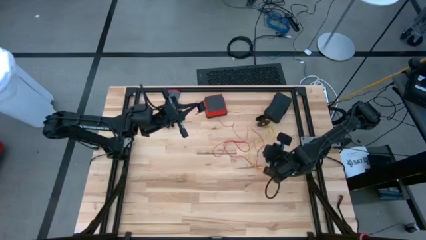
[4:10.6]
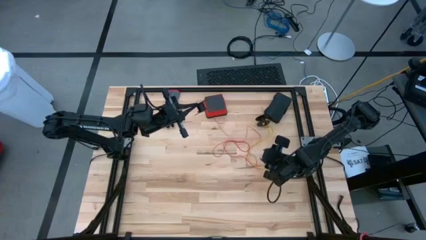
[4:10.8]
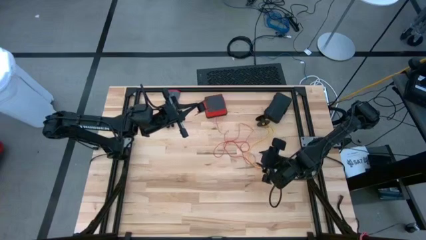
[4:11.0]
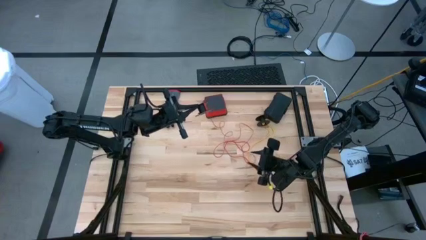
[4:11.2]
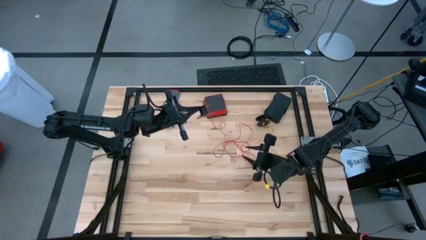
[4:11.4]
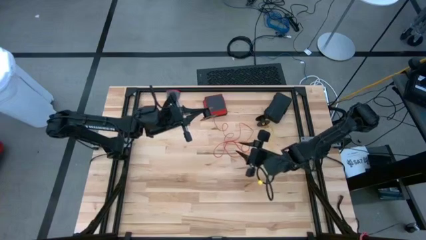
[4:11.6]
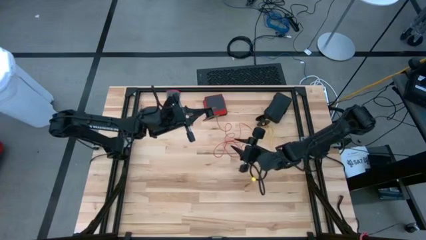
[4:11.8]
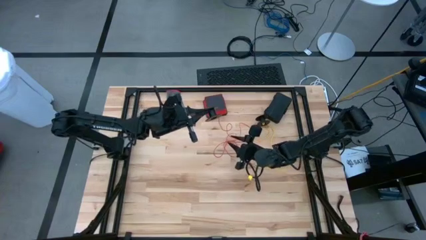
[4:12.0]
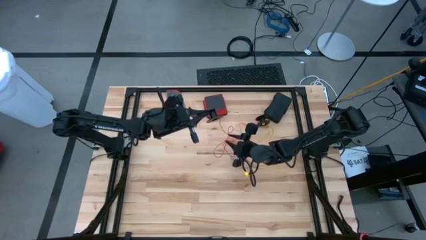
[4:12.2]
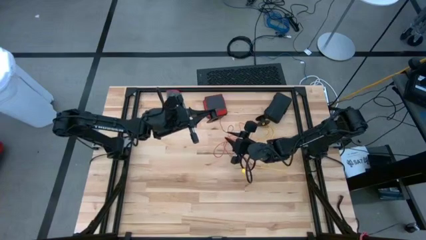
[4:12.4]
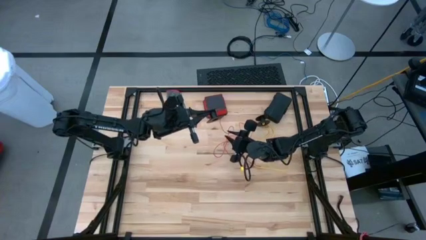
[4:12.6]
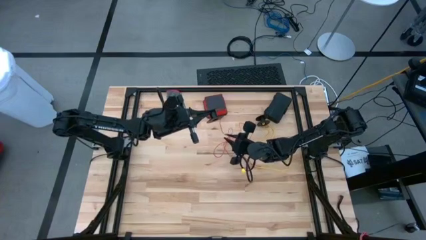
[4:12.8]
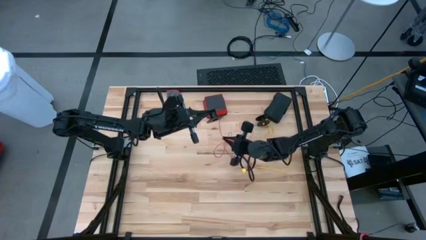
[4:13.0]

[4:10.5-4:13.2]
Task: Coil cords
Coil the red wire onto the spool

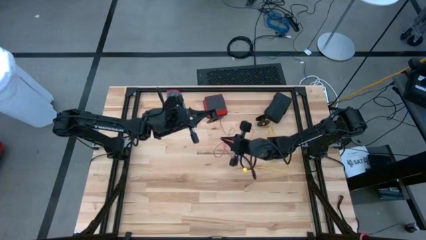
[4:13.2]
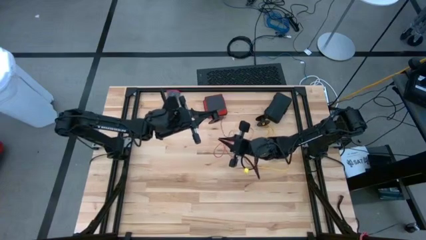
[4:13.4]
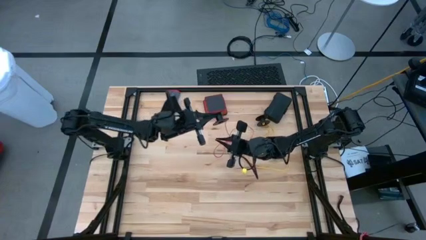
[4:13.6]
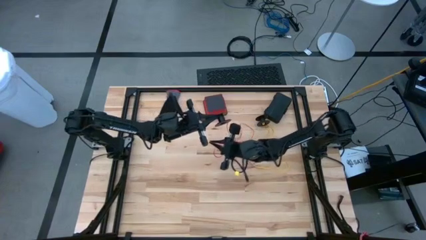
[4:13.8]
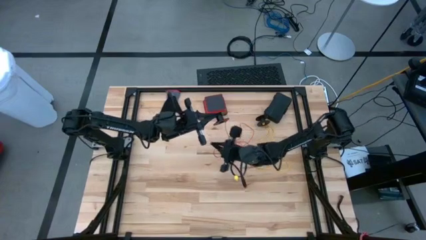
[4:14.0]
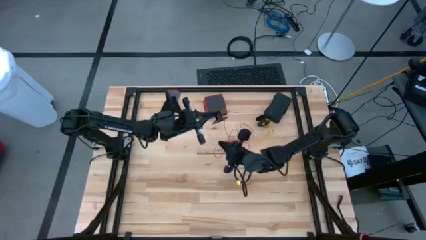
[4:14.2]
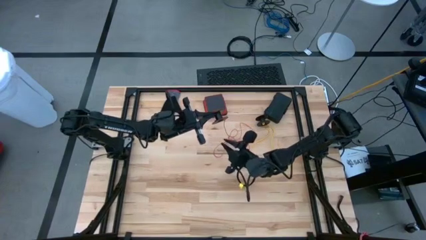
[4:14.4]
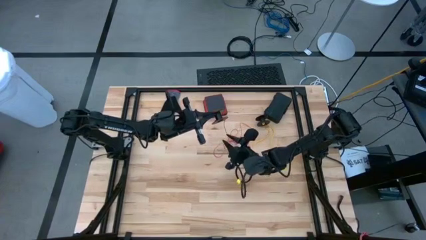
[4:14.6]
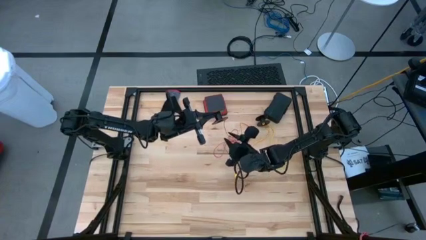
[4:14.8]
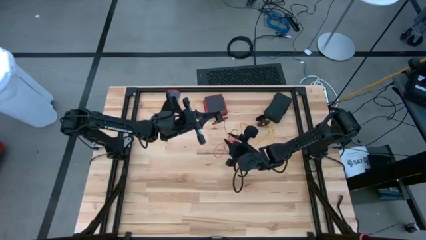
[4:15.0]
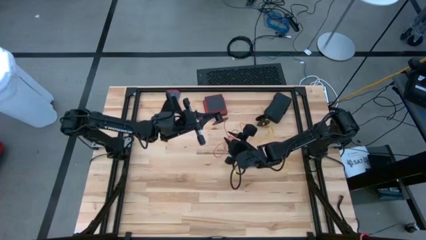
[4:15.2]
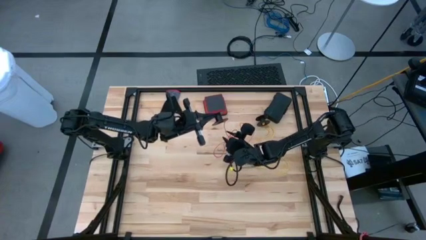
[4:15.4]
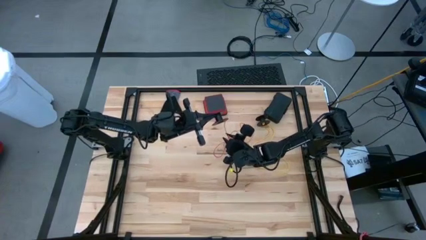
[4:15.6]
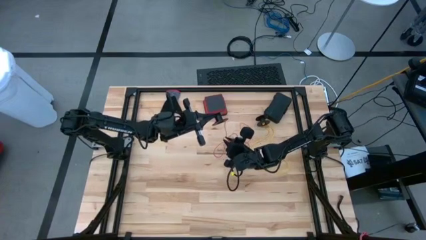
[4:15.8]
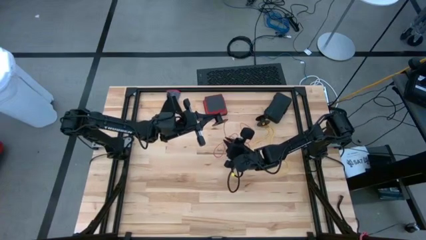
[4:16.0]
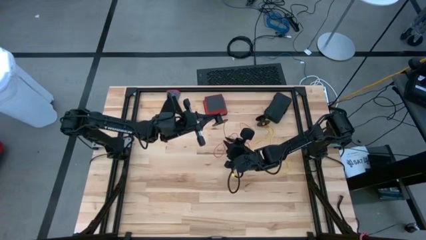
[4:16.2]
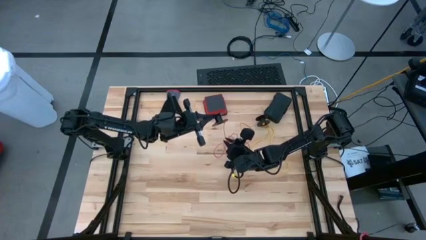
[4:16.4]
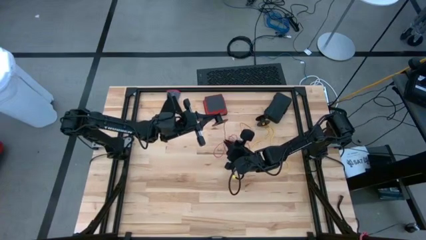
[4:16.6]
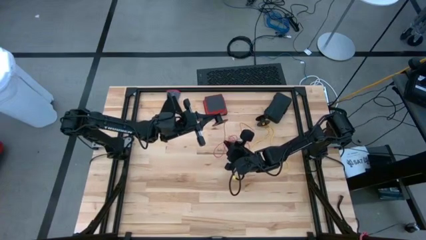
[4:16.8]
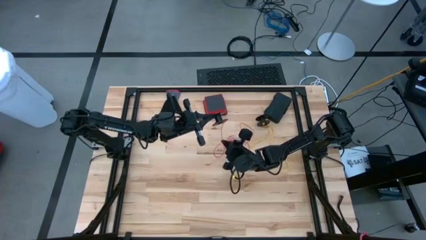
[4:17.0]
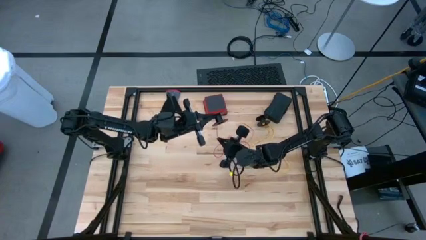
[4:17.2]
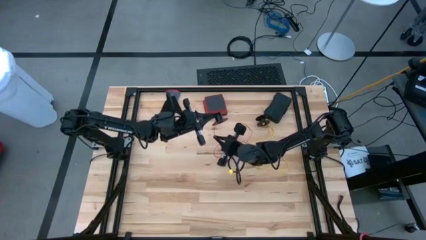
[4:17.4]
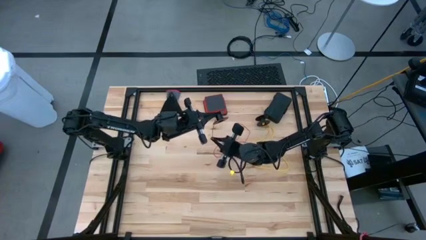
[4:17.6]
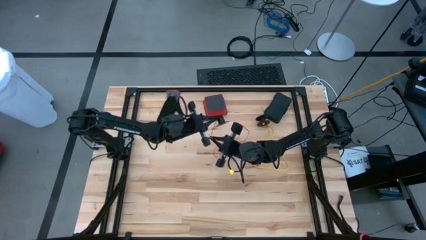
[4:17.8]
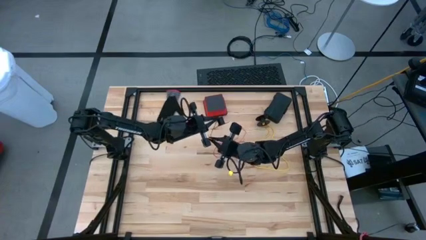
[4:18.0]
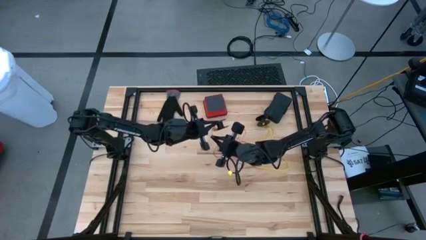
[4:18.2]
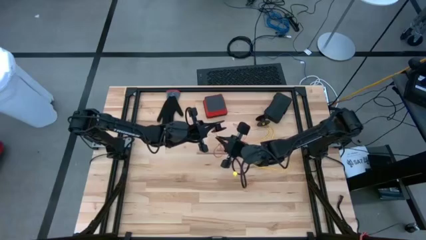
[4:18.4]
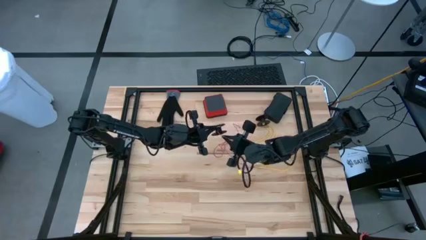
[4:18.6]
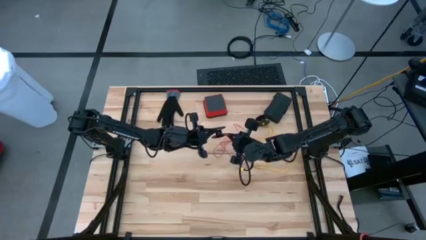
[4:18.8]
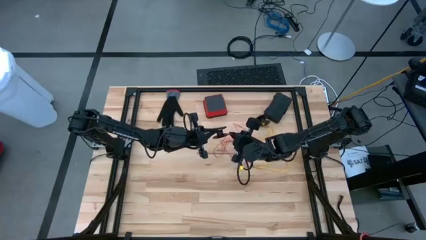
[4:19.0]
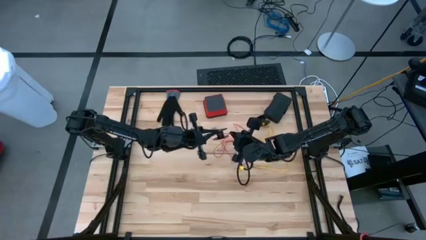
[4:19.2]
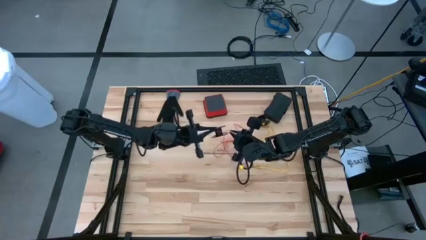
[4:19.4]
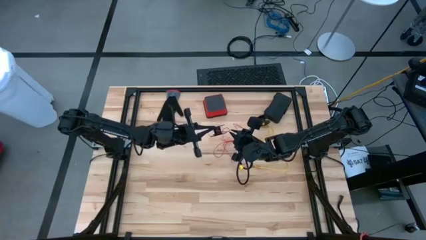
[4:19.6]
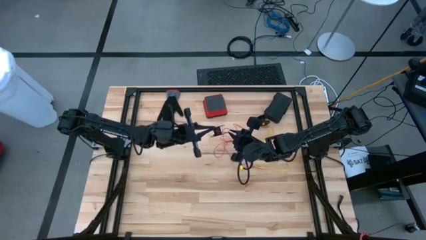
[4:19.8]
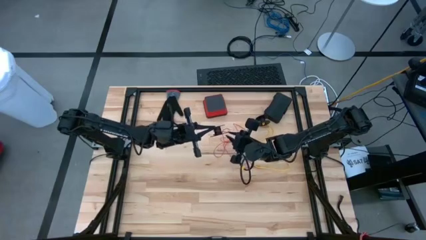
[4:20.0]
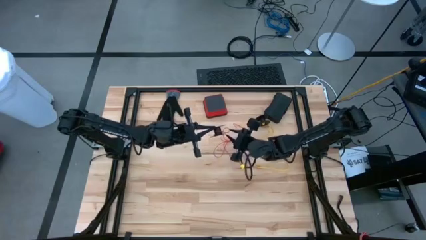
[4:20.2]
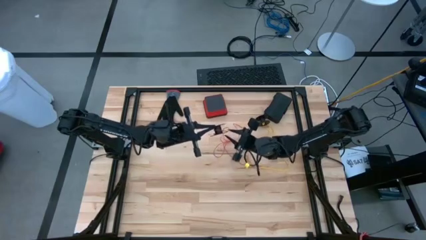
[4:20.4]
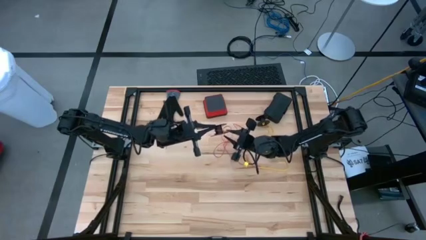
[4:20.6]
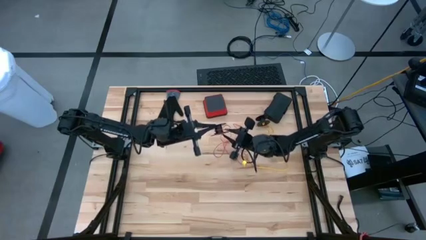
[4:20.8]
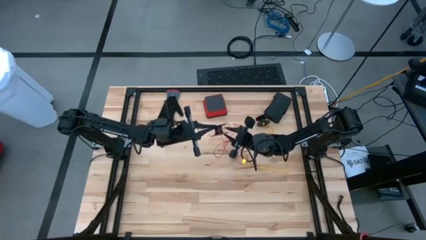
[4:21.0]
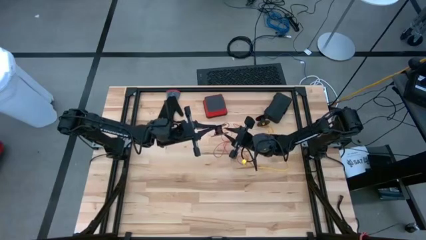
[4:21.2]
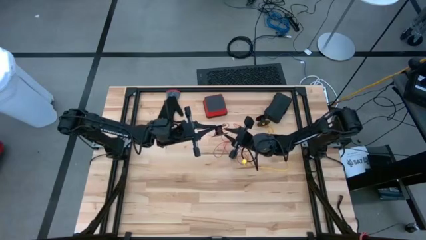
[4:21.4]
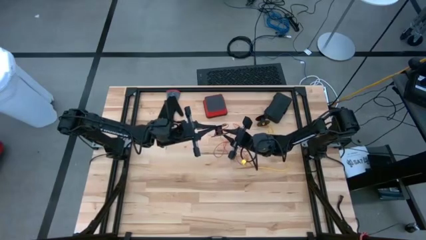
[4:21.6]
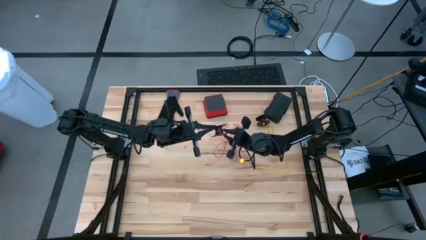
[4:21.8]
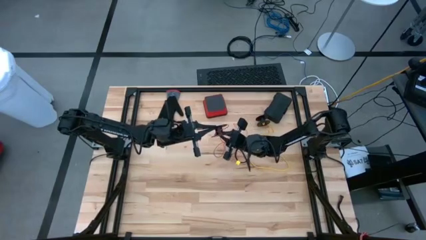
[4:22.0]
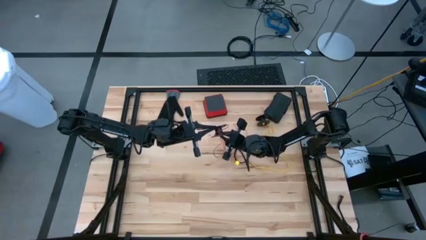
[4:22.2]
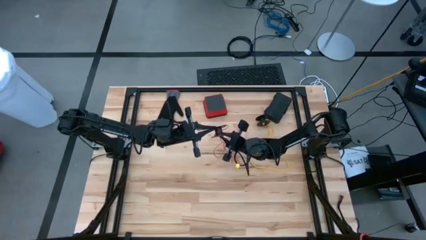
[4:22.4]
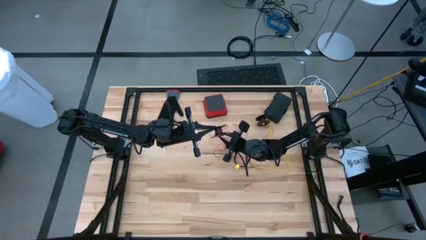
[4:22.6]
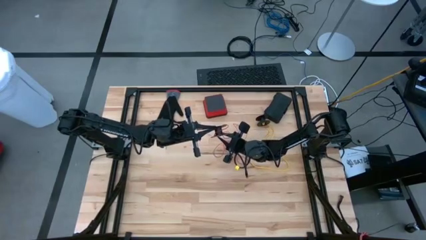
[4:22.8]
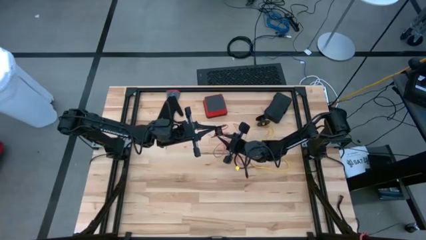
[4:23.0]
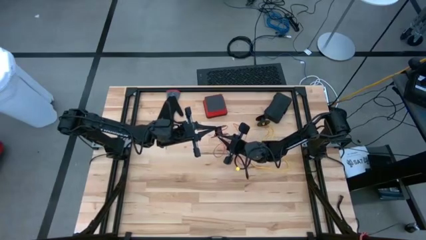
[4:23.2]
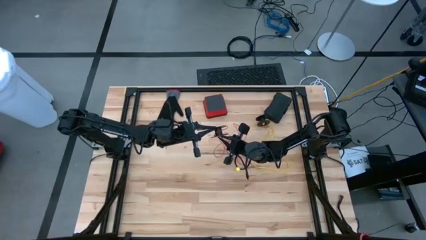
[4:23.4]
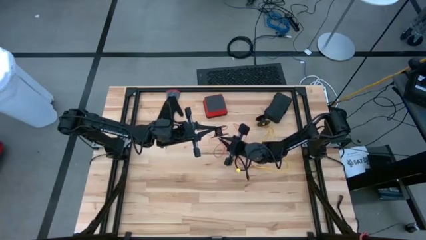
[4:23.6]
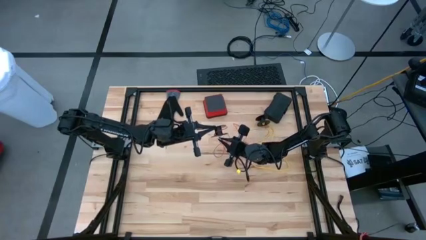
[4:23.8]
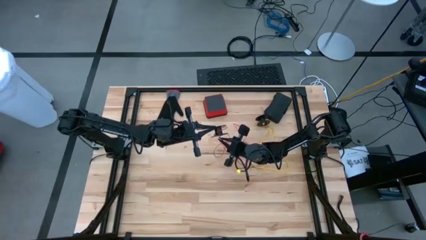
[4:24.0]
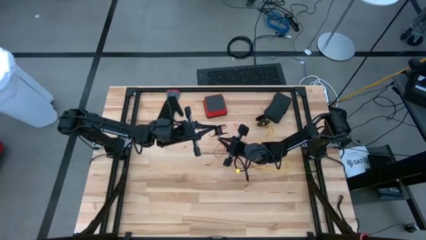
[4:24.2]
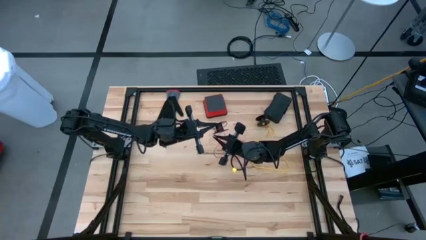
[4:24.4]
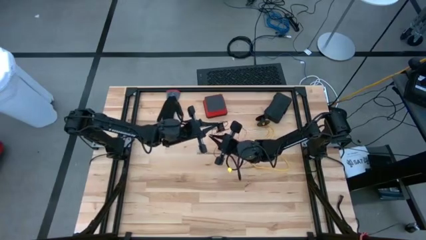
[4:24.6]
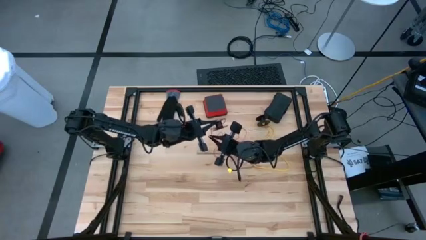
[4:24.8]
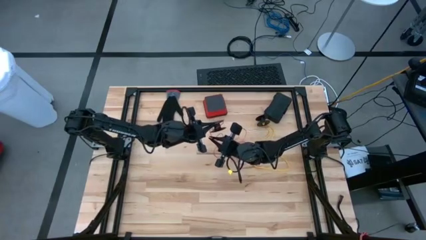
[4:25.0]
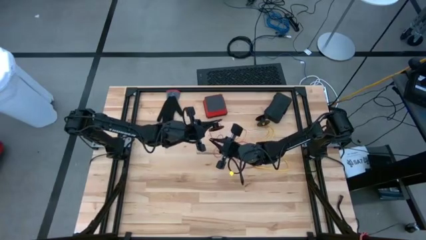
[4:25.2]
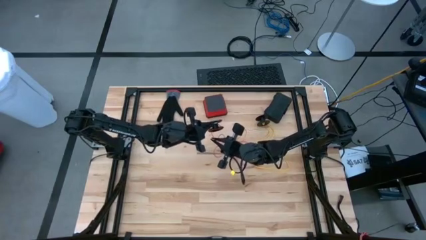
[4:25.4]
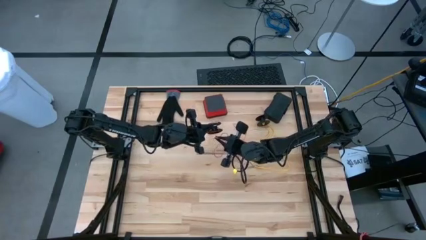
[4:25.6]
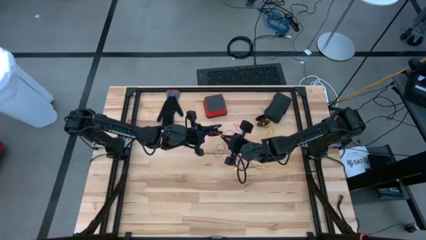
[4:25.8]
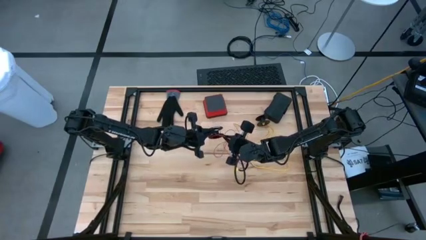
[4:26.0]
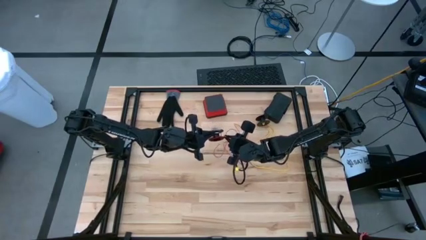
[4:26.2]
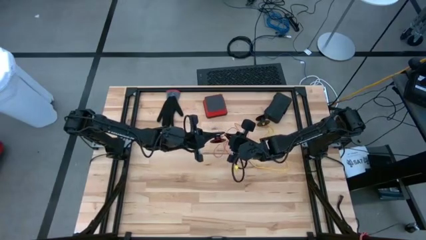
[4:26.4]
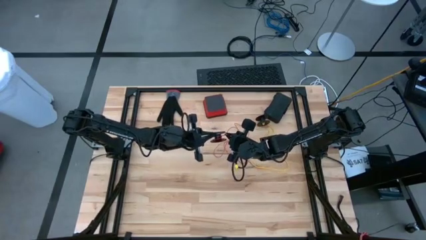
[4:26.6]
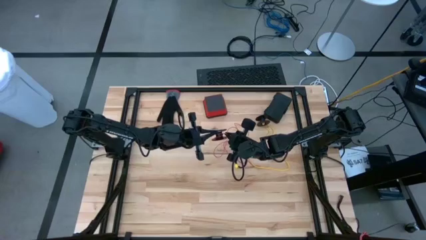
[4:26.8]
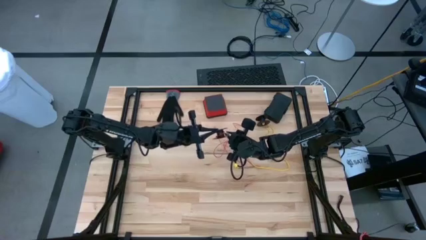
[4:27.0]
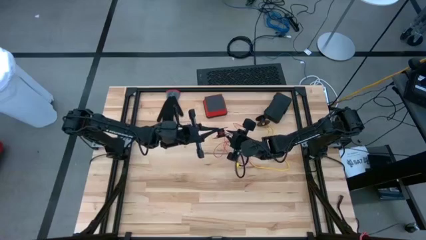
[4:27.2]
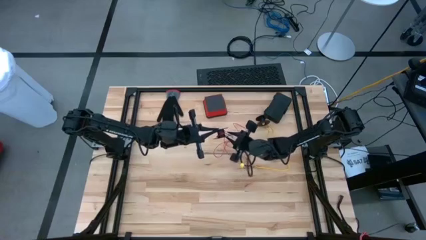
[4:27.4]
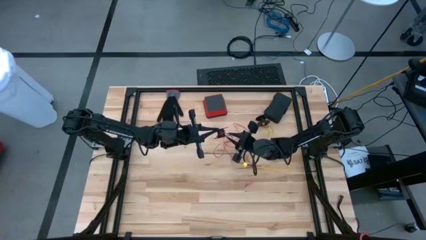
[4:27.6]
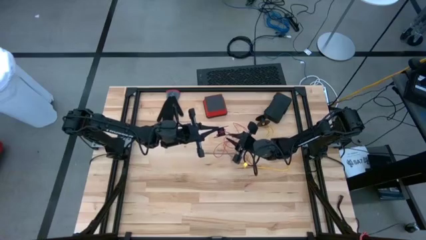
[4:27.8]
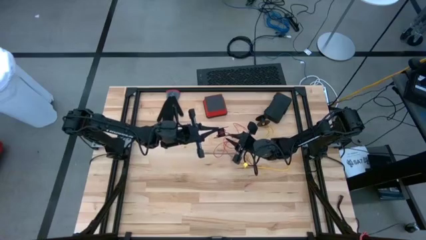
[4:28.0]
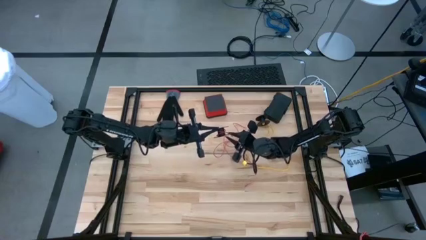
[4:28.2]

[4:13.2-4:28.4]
Coil the red wire onto the spool
